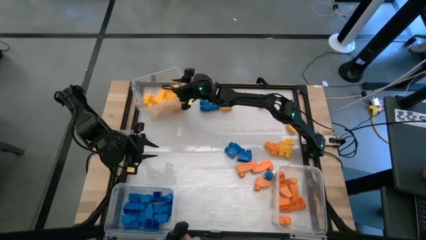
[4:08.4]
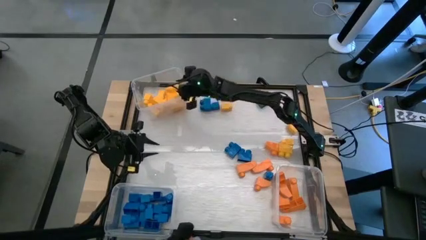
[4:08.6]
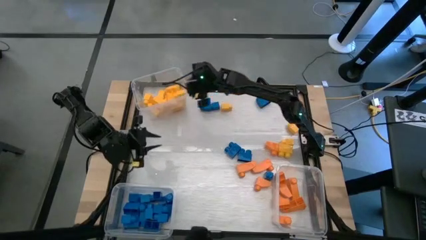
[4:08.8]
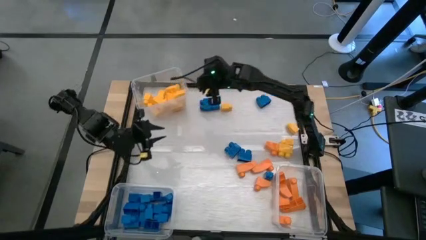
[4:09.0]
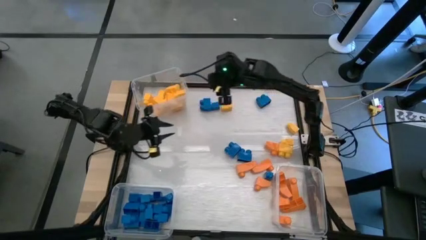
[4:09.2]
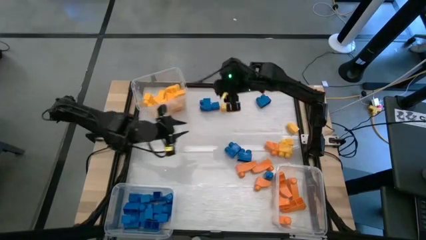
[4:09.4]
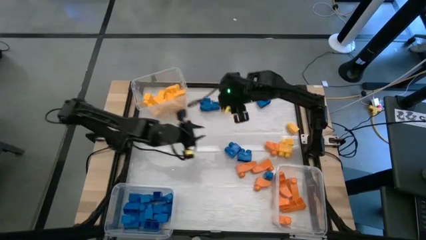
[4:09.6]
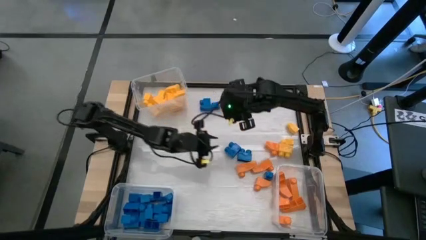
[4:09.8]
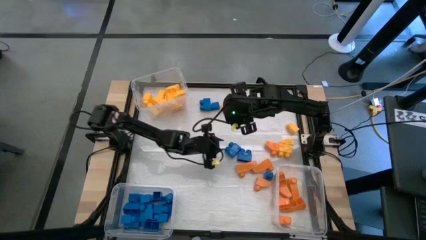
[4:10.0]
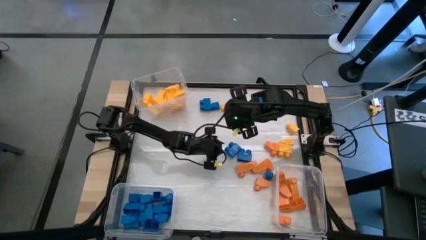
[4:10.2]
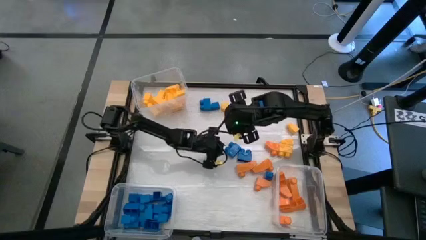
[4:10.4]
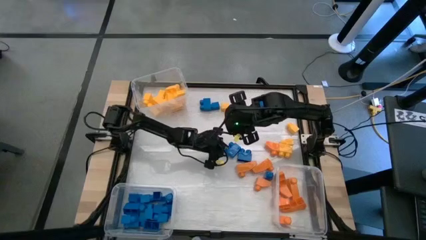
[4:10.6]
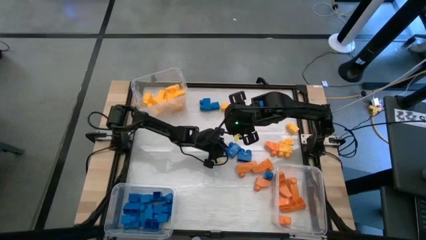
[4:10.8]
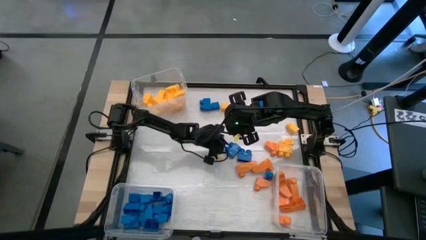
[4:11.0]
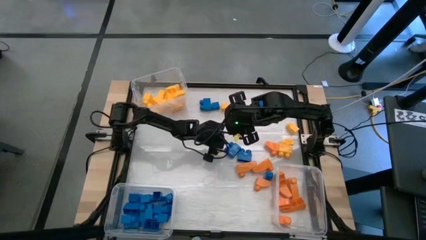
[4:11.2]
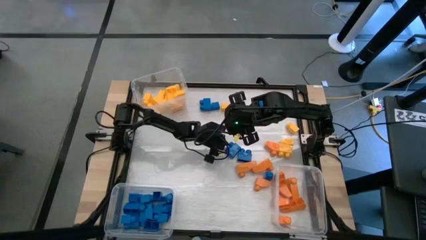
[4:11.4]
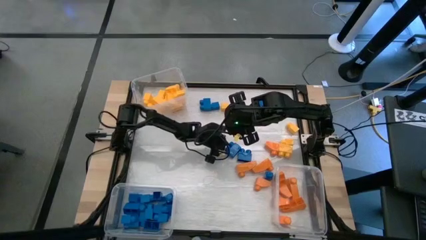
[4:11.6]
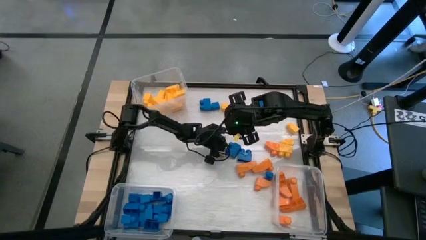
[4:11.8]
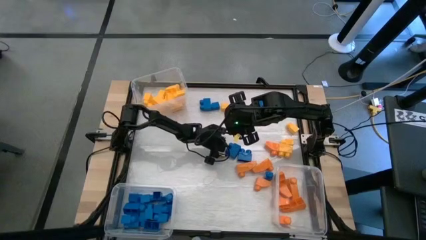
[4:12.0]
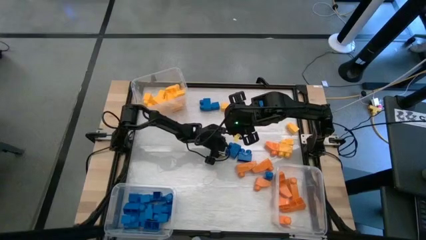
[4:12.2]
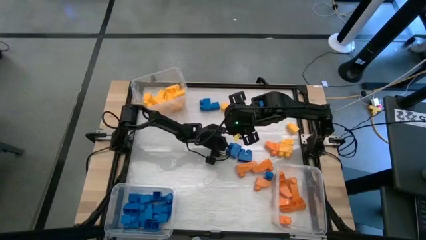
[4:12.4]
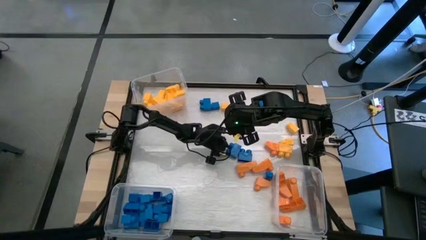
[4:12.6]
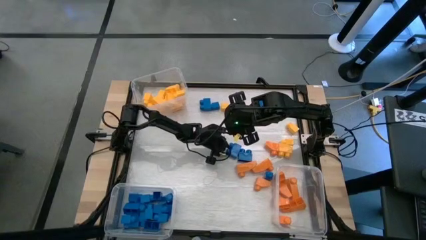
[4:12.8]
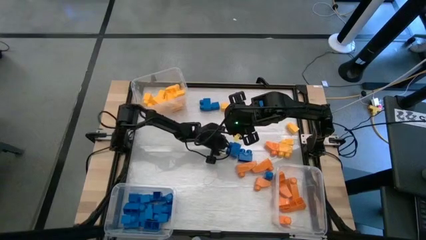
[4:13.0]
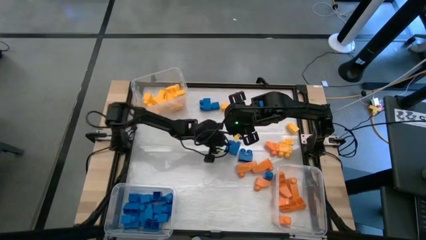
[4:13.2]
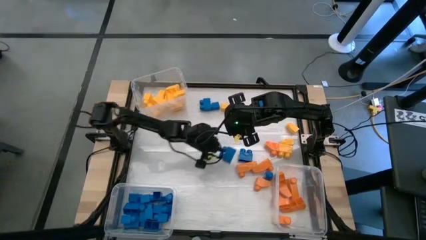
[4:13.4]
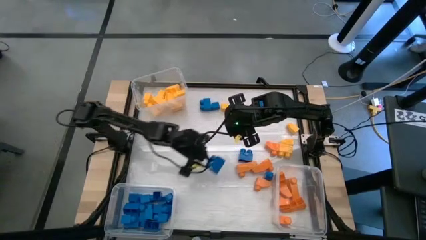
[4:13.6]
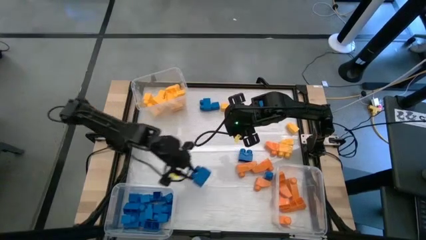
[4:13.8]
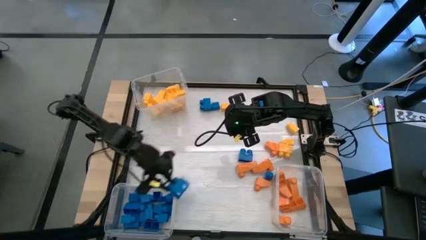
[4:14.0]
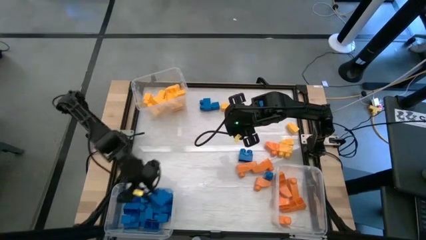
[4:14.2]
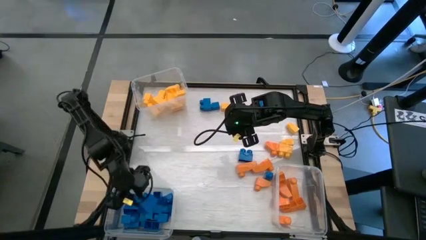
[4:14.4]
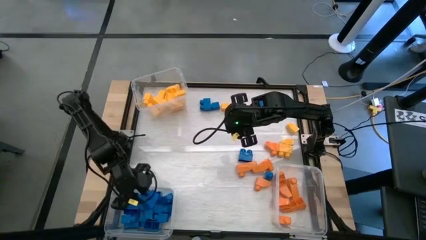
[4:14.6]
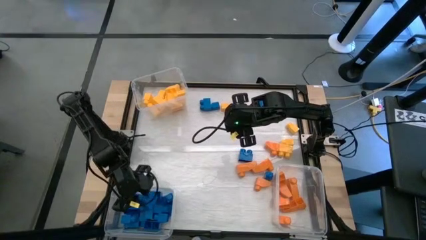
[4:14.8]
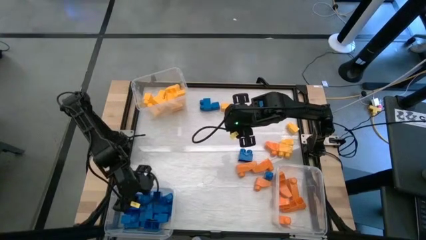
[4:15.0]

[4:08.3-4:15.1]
Task: Sort blocks
Put the blue game piece into the bottom left transparent bin

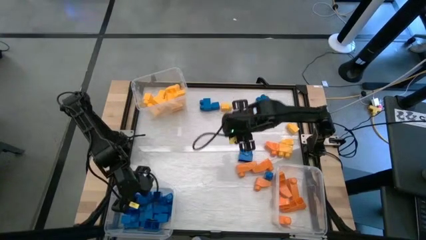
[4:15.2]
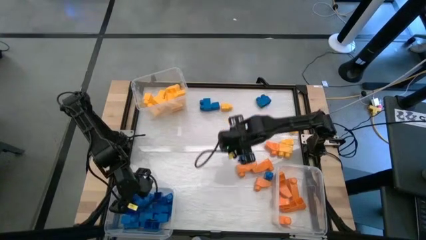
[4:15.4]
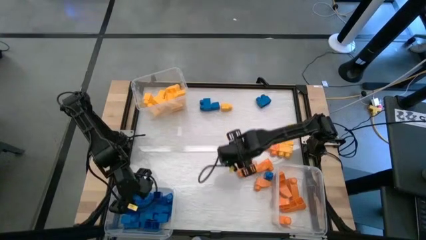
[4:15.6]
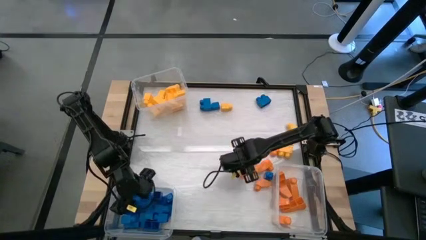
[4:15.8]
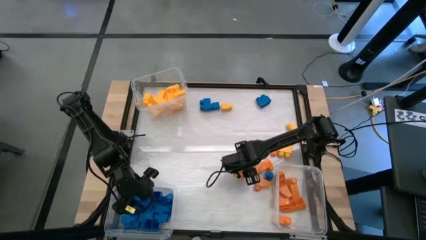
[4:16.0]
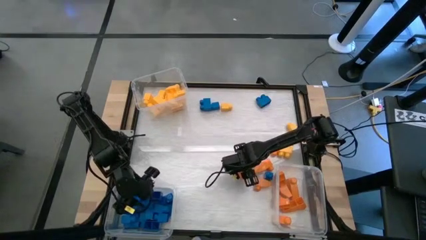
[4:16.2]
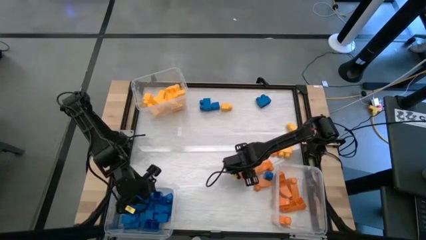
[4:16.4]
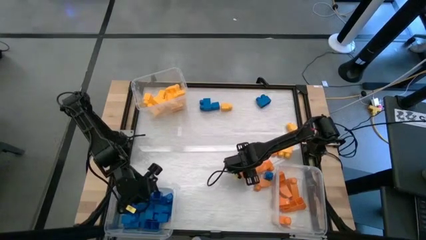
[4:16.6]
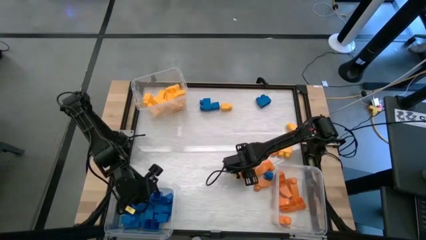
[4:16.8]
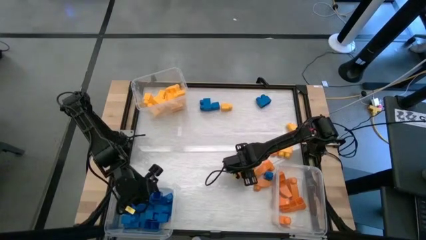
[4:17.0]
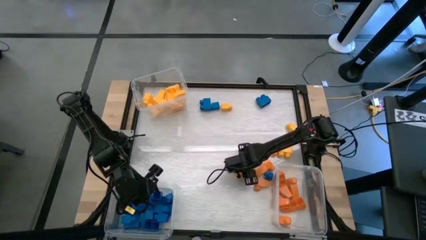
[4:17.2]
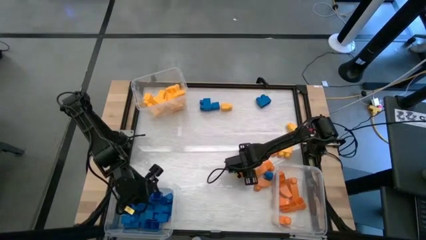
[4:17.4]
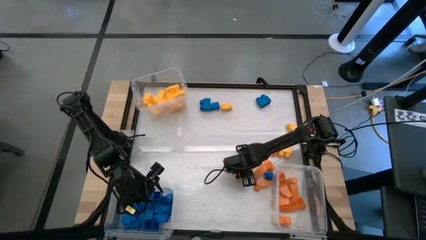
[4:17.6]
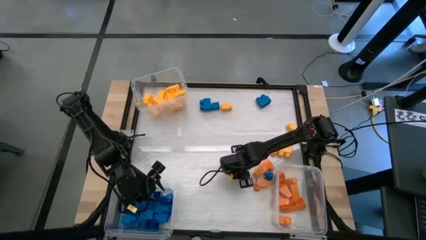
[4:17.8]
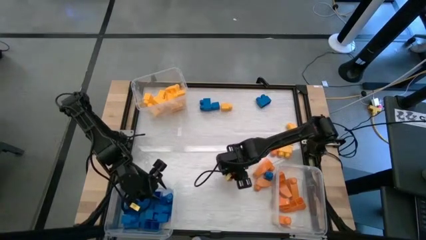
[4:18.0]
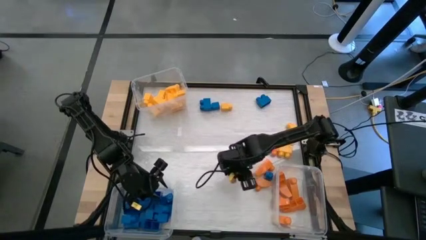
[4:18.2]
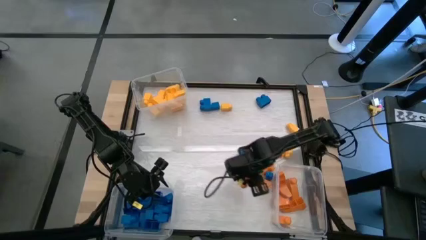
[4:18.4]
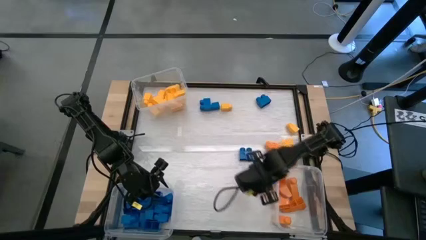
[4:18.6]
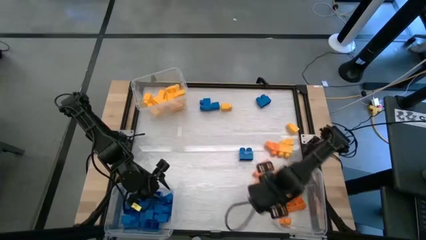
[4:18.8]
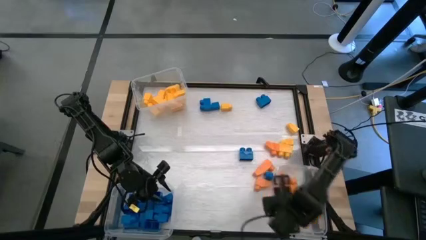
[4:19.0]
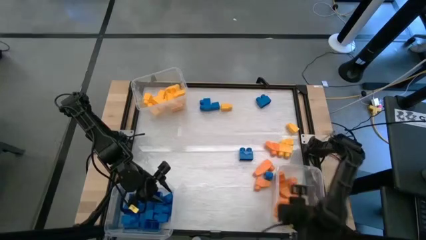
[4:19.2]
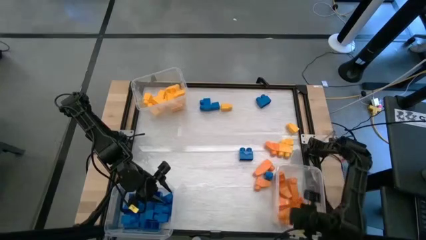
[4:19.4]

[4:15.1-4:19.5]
Put the orange game piece into the bottom right transparent bin

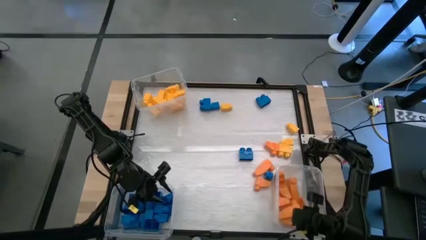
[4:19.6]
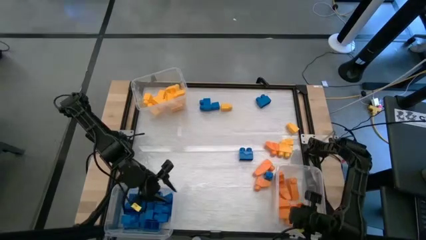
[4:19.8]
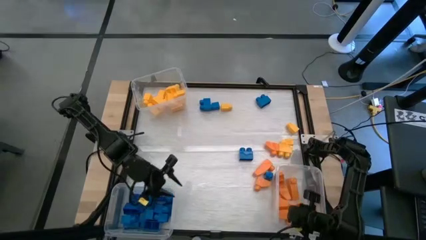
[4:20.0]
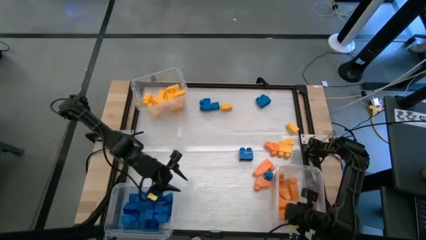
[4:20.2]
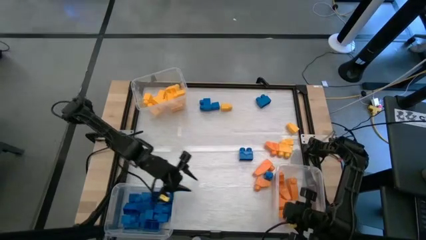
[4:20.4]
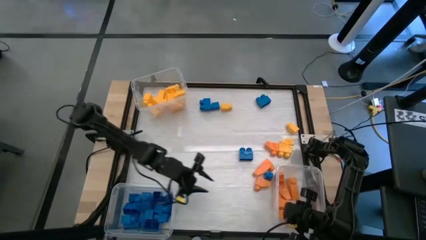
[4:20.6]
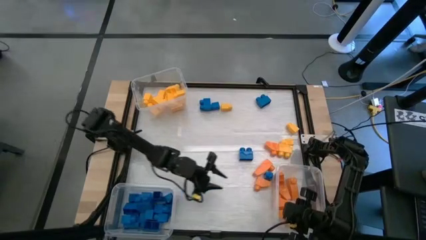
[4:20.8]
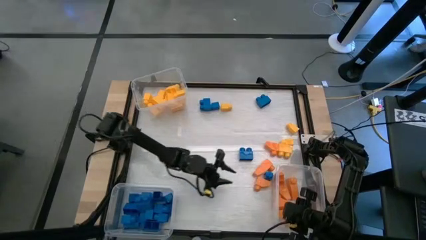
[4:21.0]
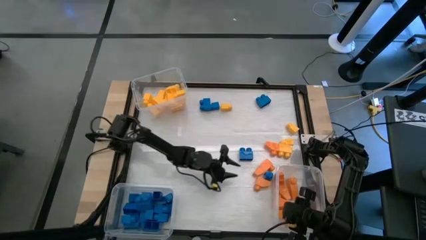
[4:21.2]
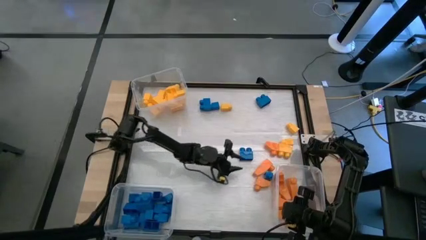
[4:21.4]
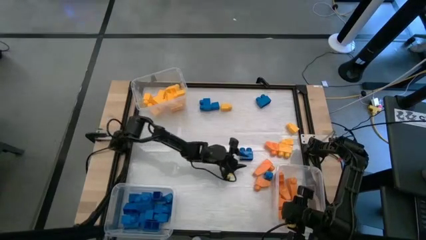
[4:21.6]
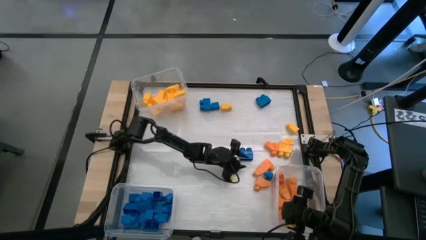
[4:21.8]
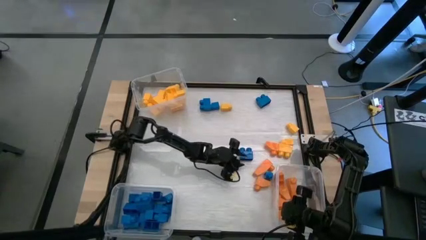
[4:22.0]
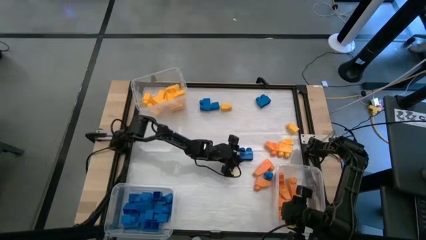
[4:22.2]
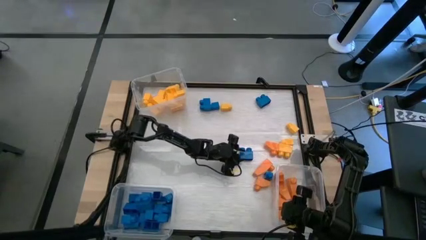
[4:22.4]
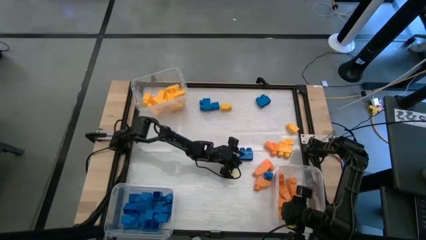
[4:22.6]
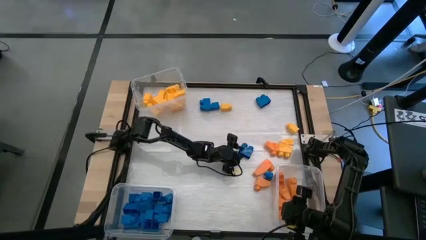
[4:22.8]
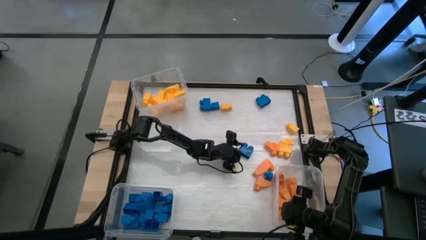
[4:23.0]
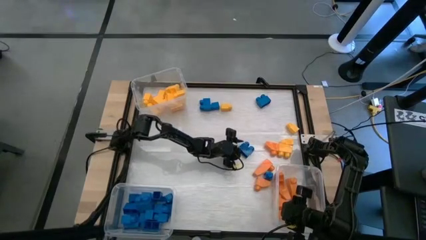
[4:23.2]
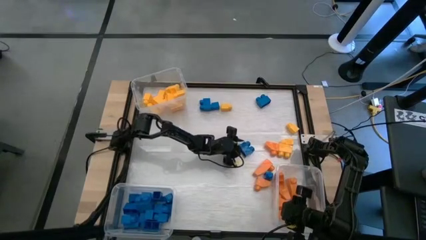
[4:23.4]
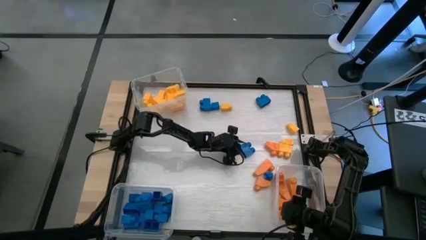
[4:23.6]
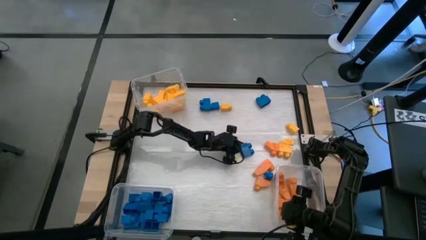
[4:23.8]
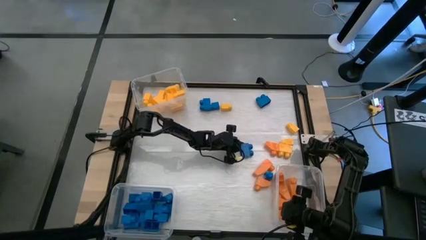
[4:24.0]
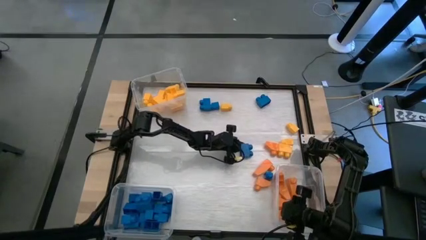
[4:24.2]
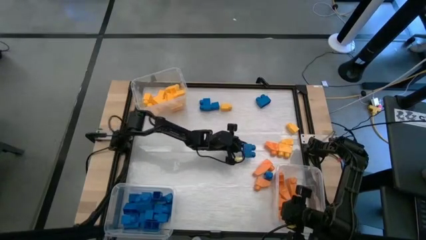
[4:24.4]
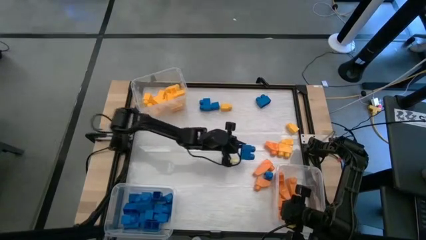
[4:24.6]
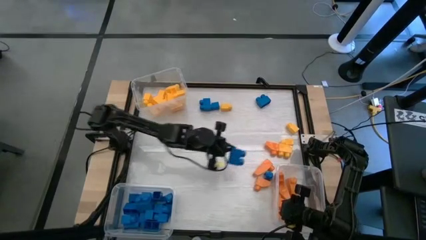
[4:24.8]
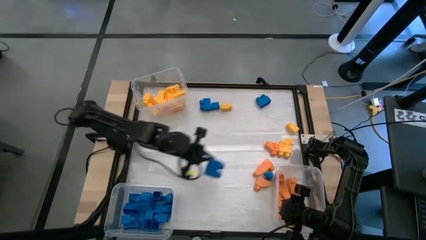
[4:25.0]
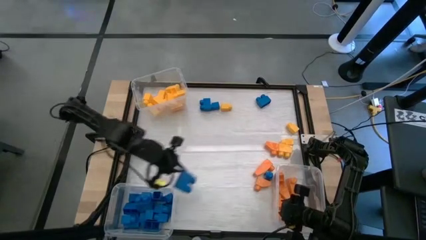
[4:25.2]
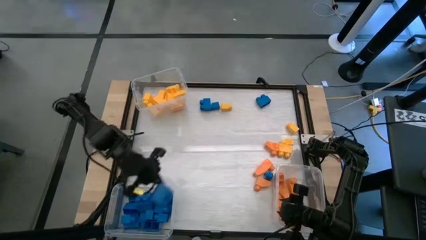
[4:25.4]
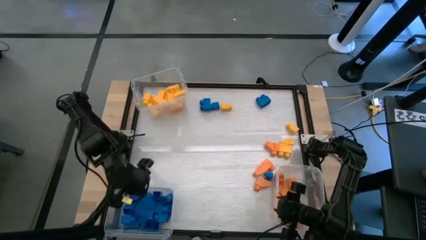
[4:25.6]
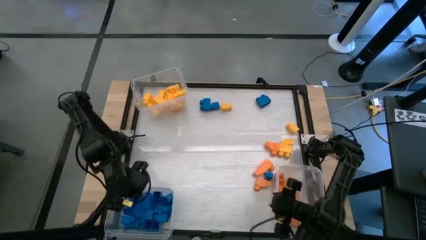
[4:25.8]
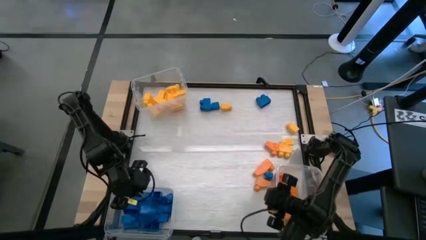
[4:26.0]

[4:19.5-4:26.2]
Put the blue game piece into the bottom left transparent bin
